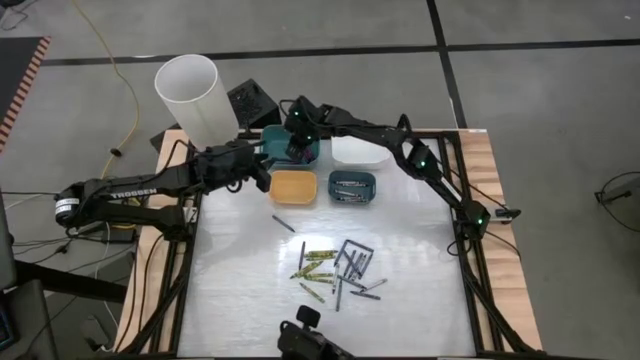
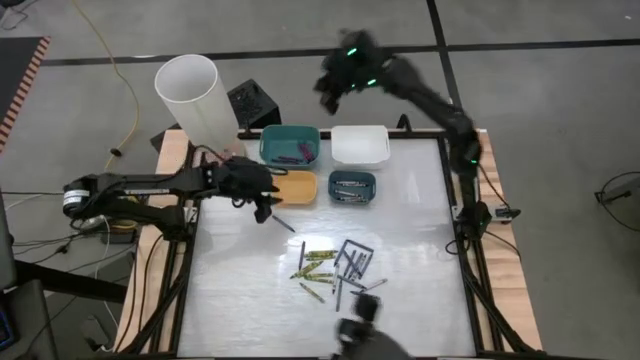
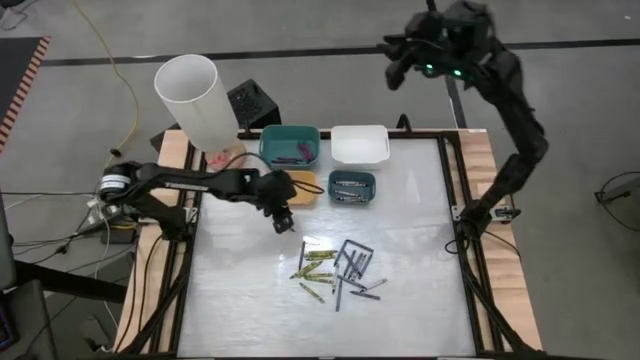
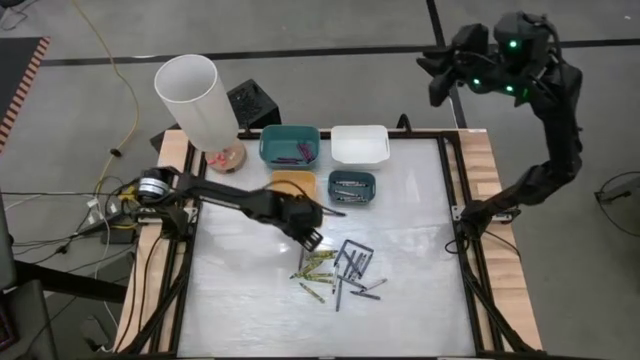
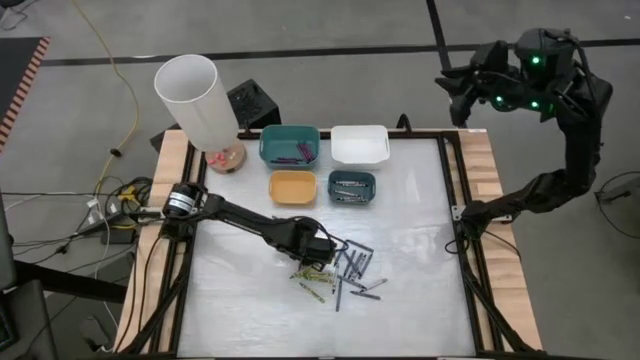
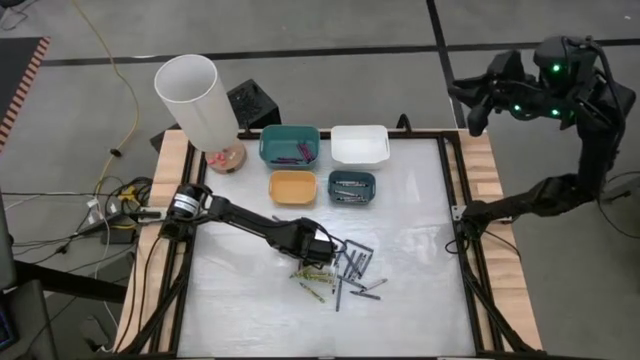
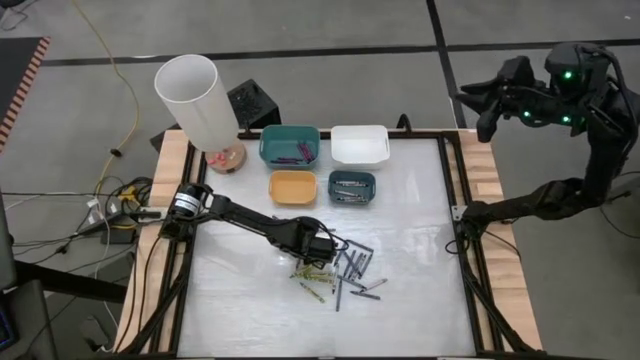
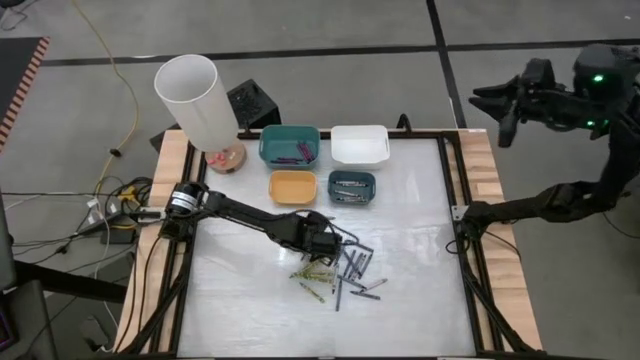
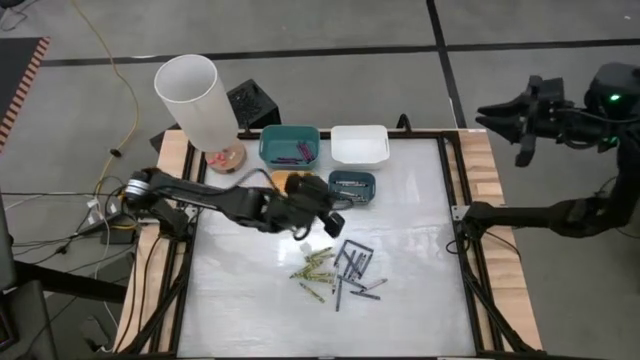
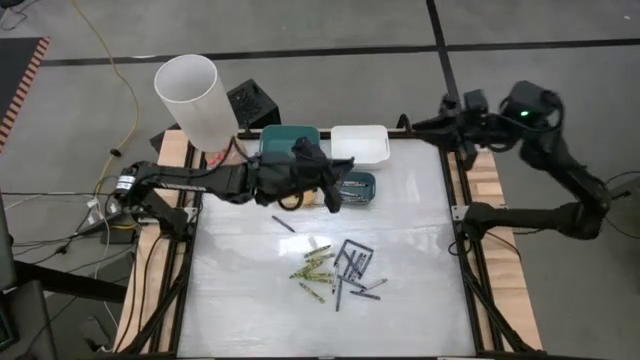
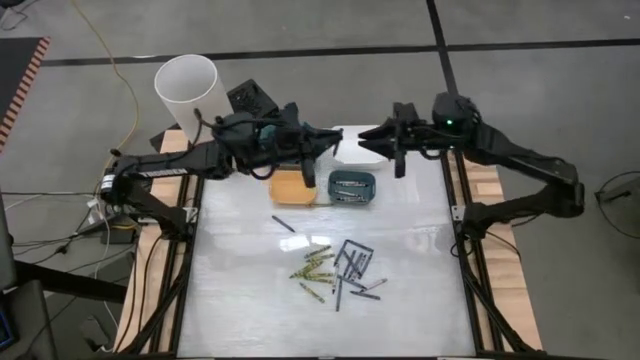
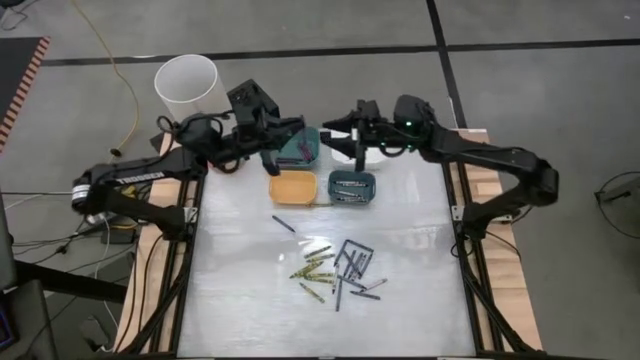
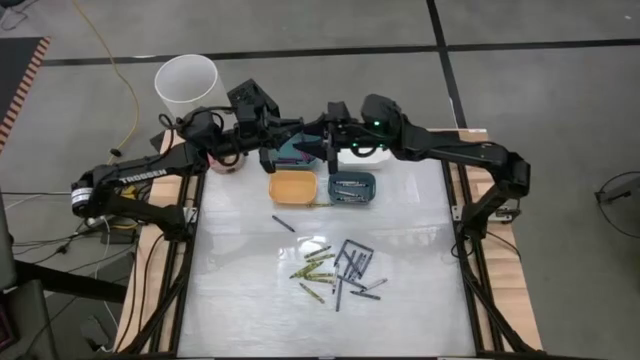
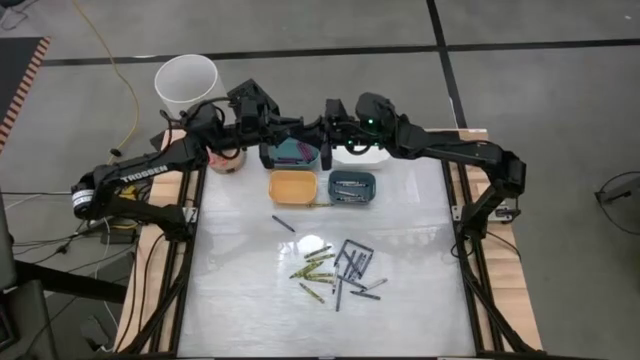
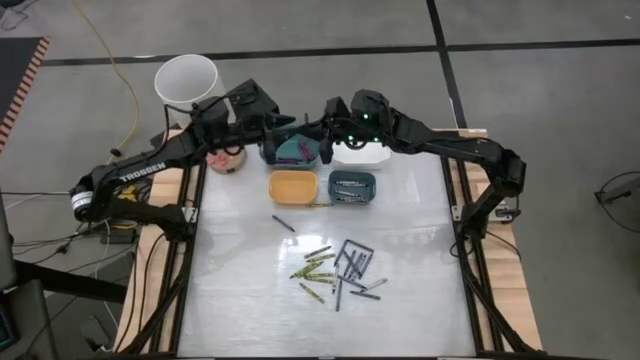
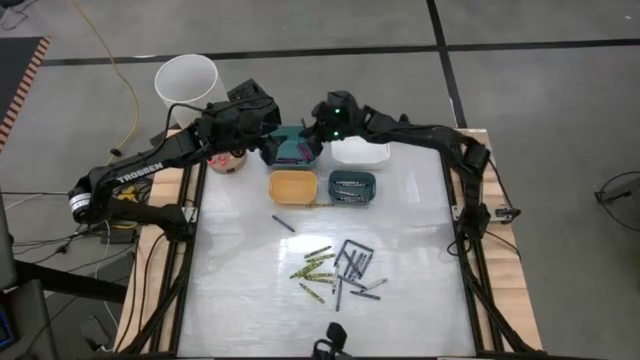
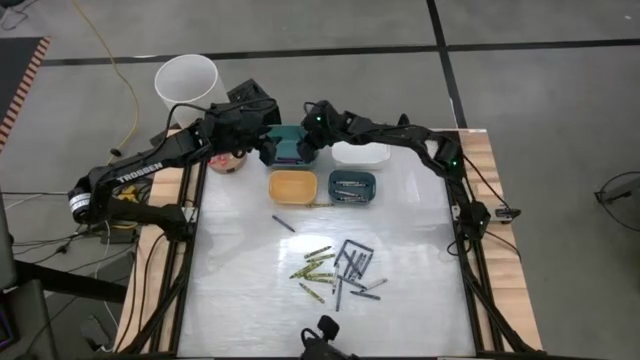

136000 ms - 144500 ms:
Task: Sort crayons
Put the violet crayon into the green bin

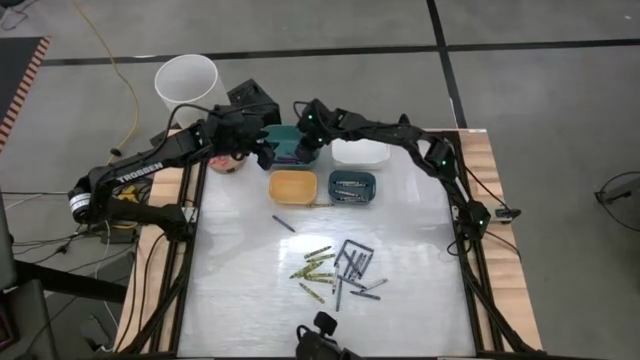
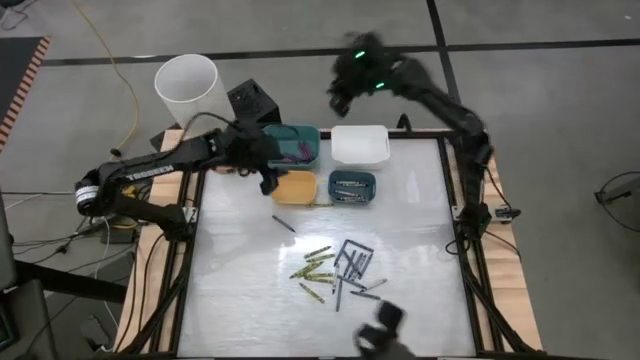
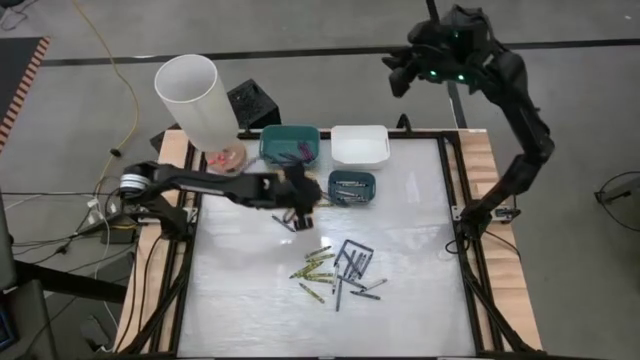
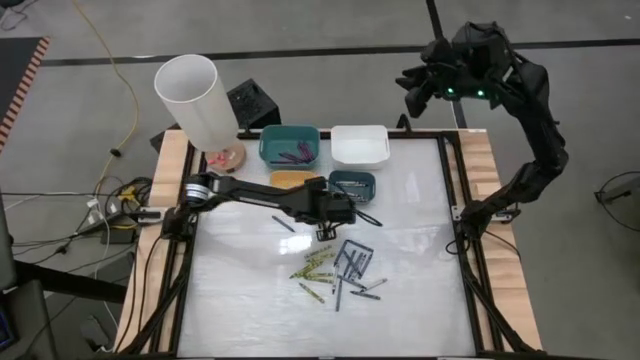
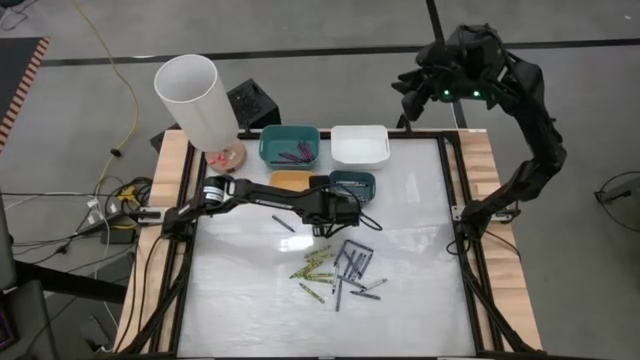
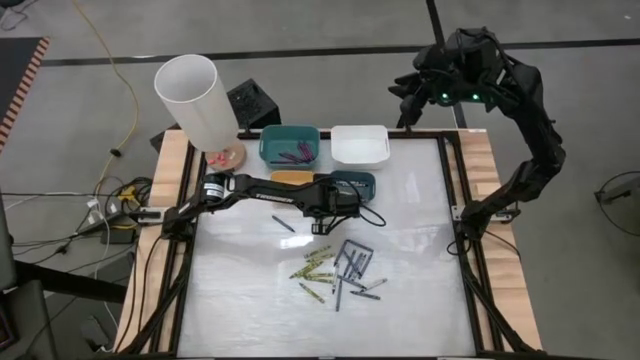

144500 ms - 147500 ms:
Prepare the green crayon

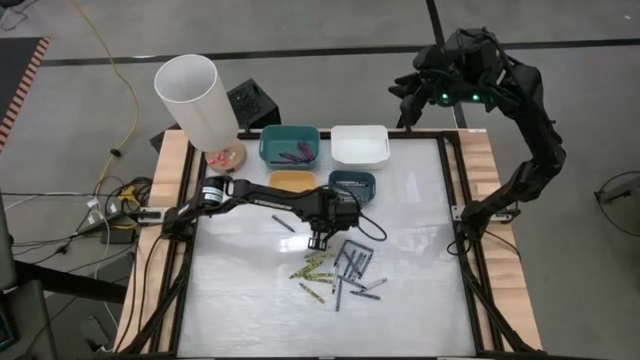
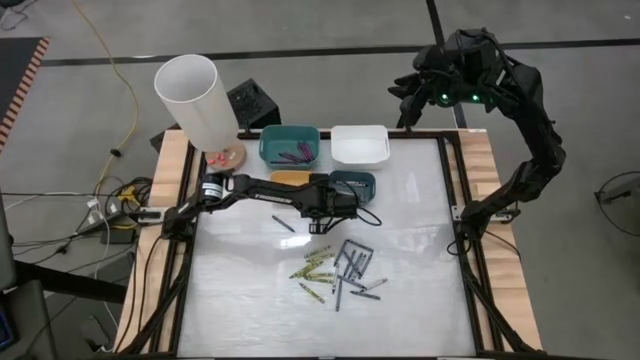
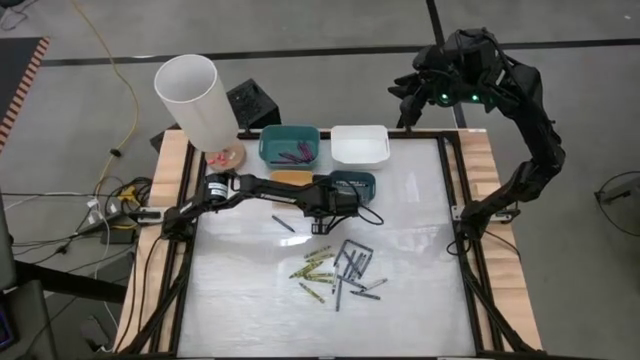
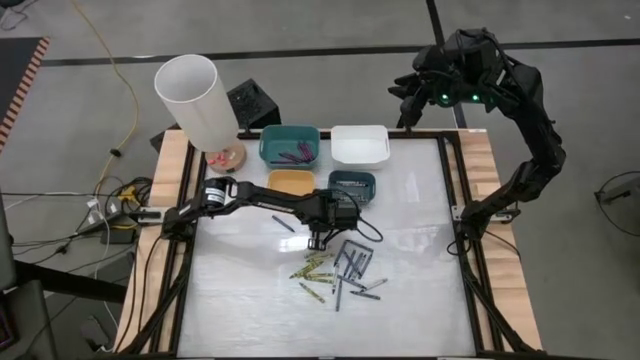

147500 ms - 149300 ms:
Prepare the green crayon

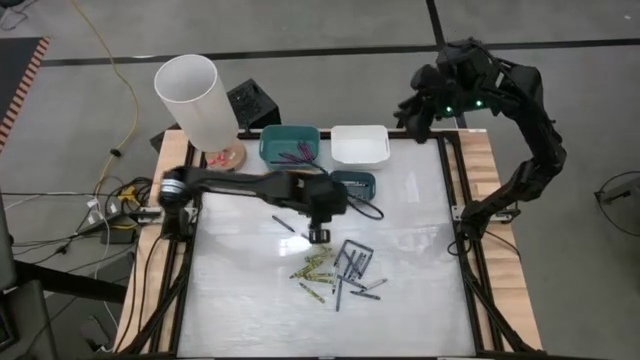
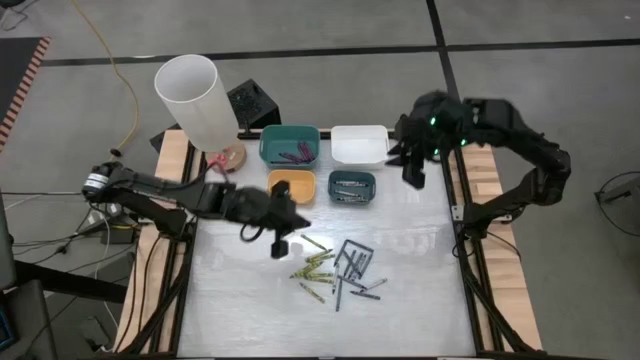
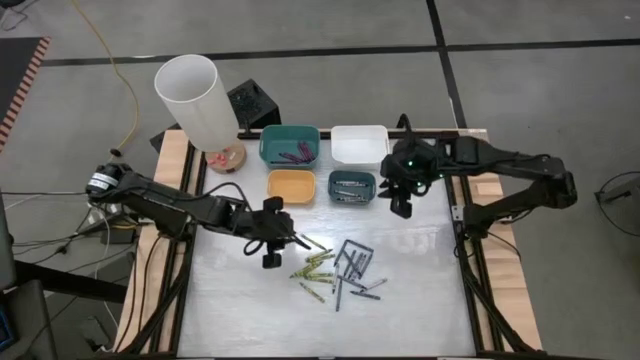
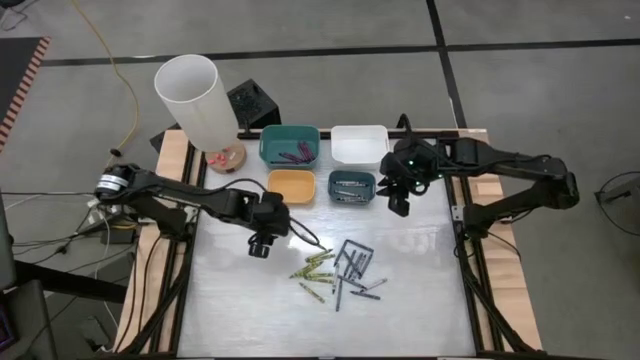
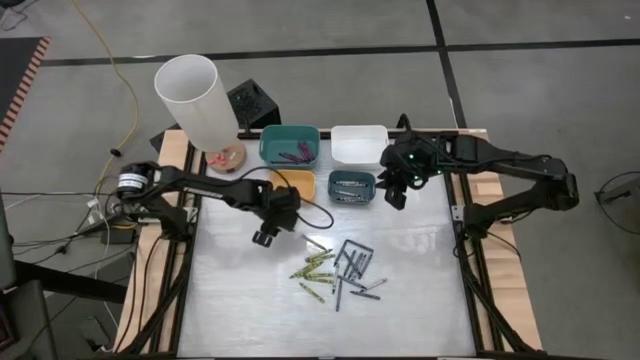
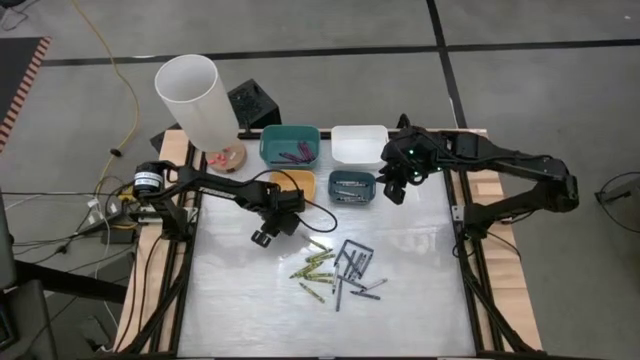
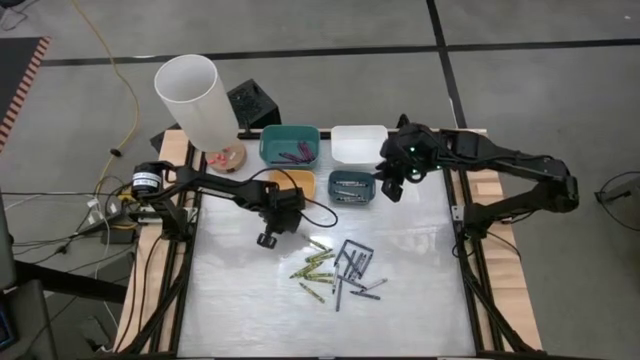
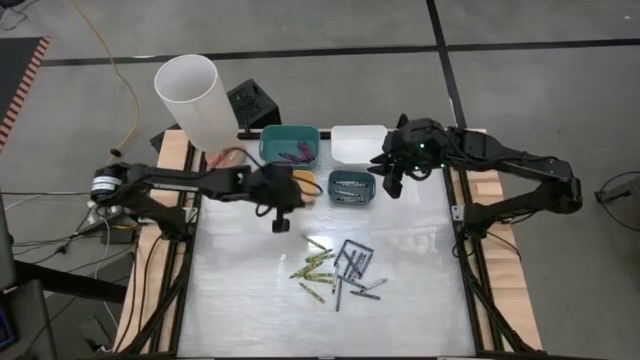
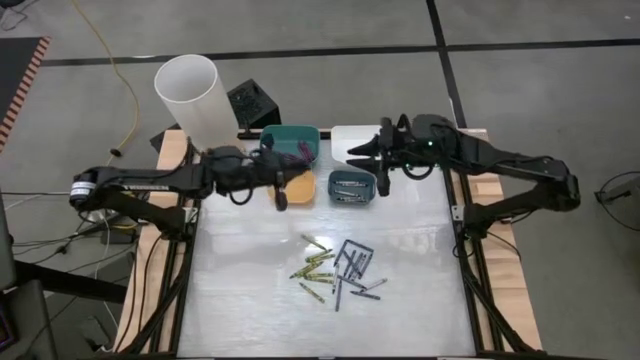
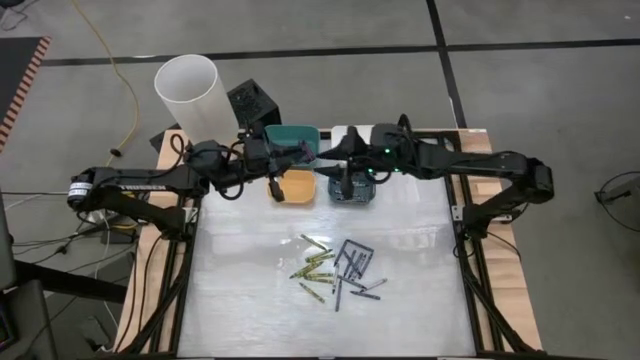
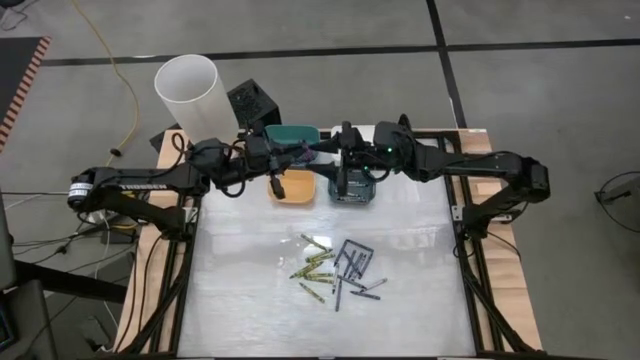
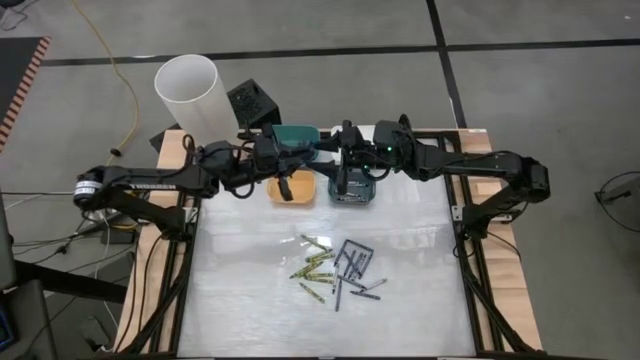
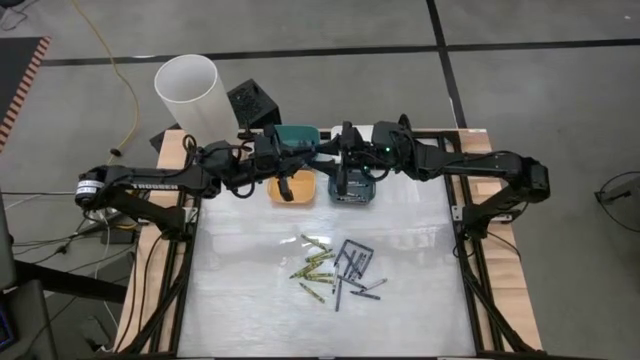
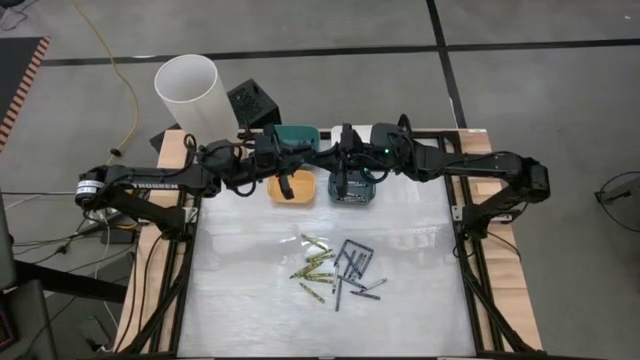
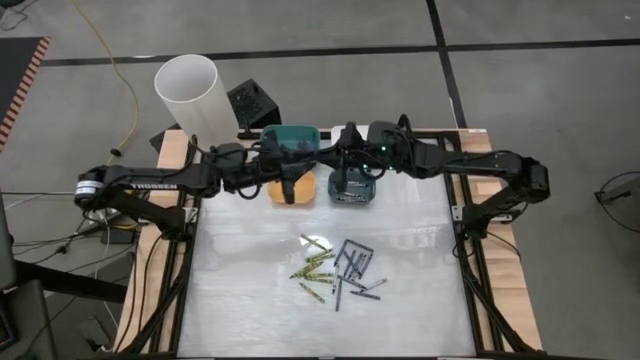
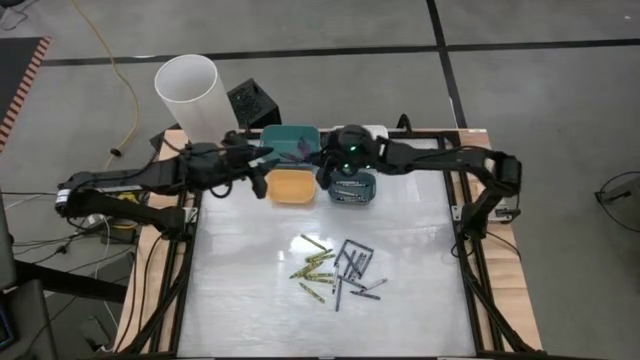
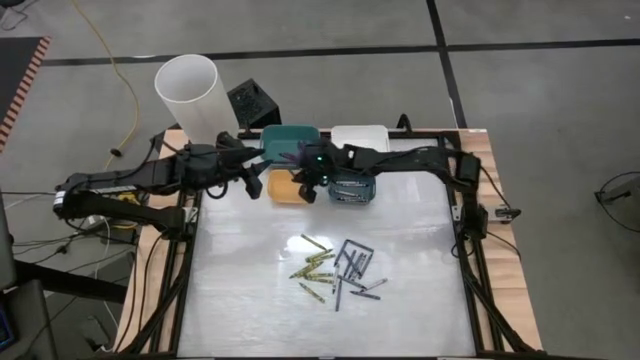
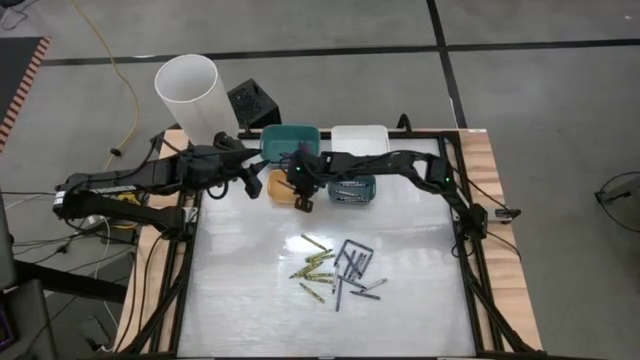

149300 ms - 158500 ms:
Put the blue crayon into the yellow bin
